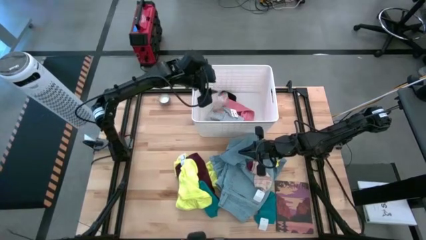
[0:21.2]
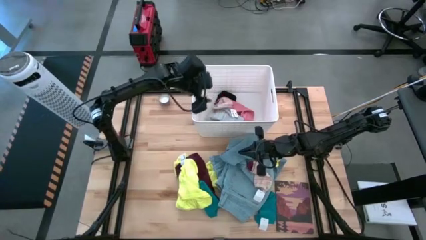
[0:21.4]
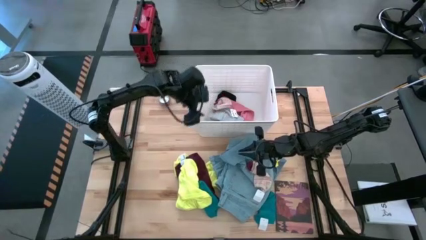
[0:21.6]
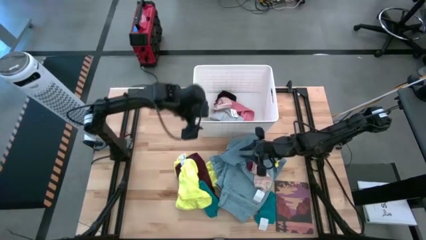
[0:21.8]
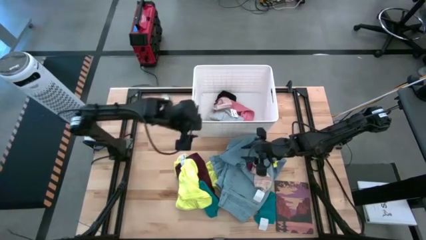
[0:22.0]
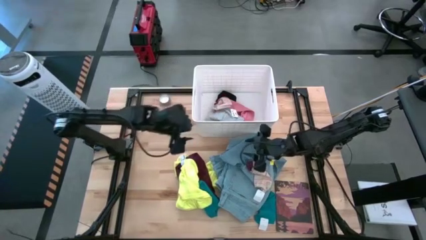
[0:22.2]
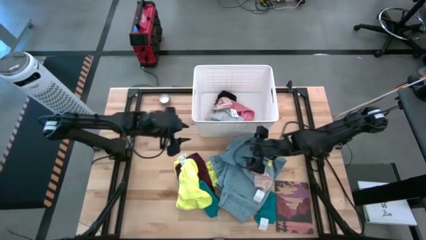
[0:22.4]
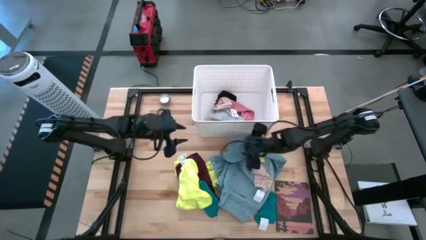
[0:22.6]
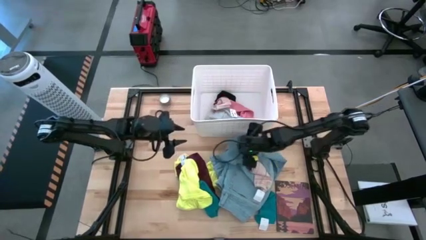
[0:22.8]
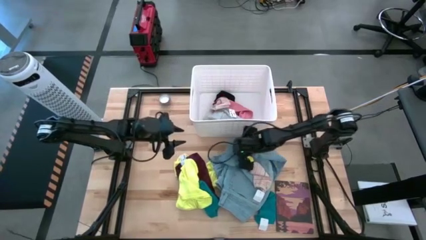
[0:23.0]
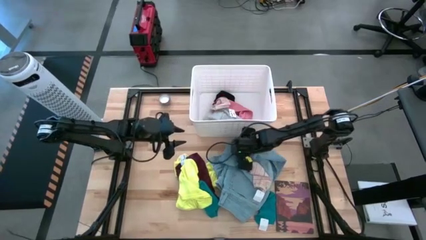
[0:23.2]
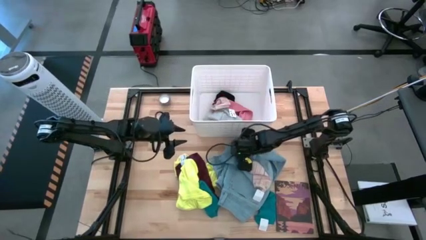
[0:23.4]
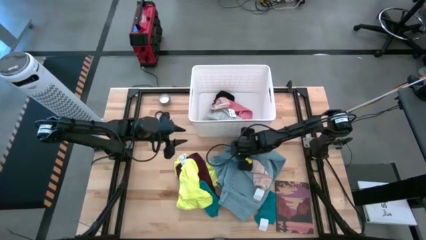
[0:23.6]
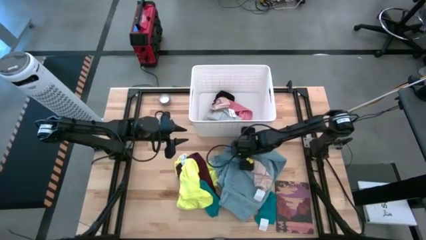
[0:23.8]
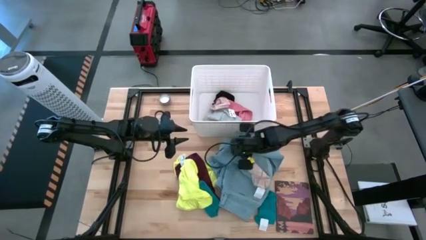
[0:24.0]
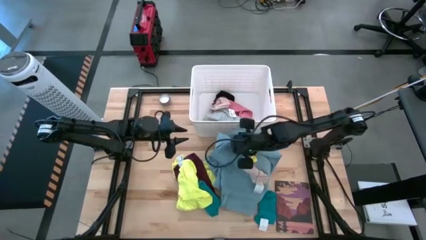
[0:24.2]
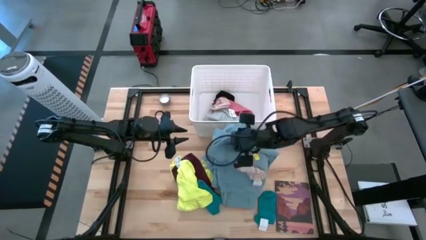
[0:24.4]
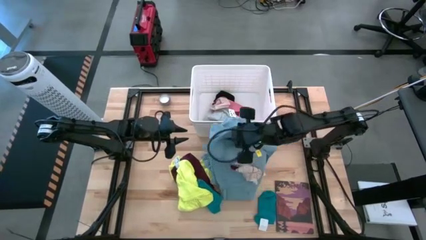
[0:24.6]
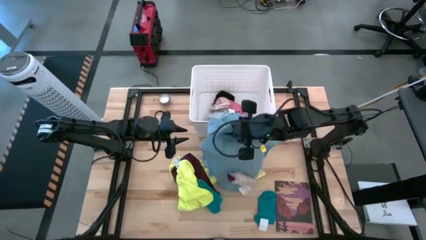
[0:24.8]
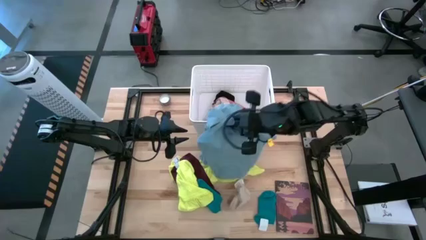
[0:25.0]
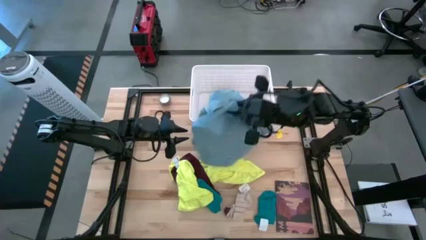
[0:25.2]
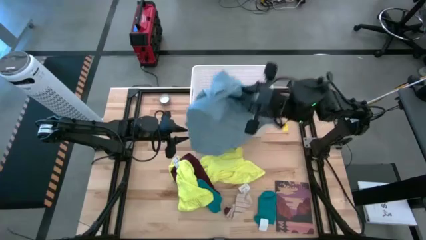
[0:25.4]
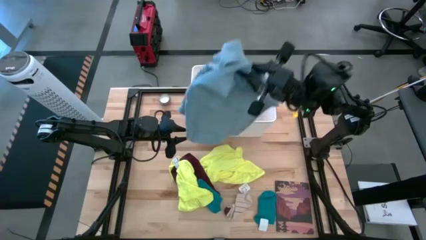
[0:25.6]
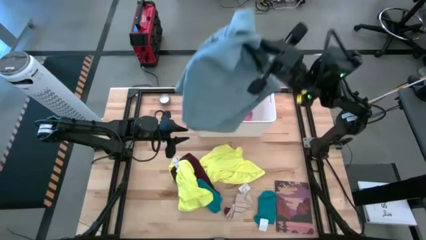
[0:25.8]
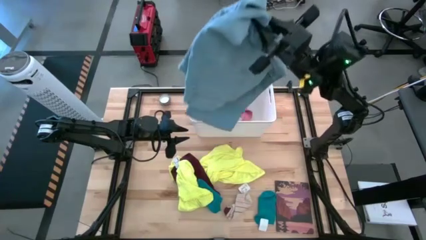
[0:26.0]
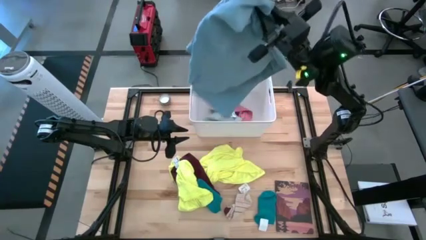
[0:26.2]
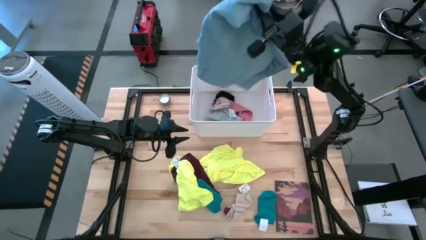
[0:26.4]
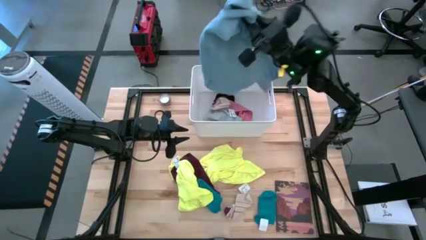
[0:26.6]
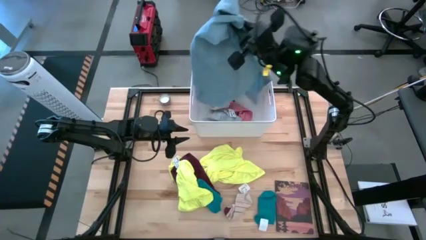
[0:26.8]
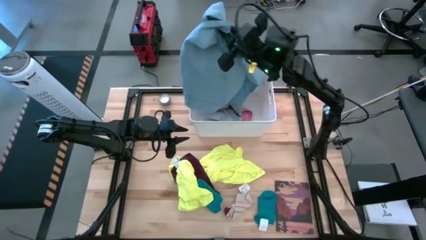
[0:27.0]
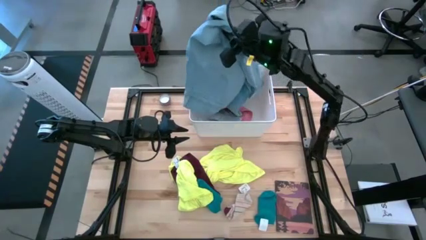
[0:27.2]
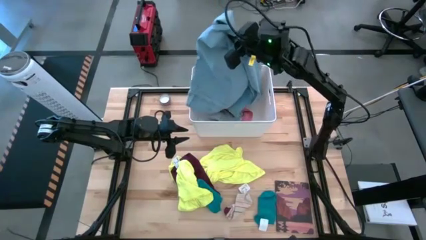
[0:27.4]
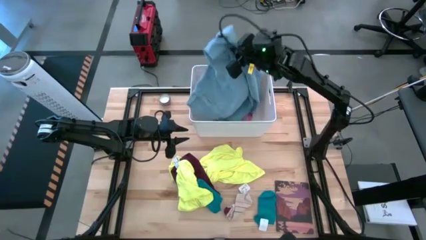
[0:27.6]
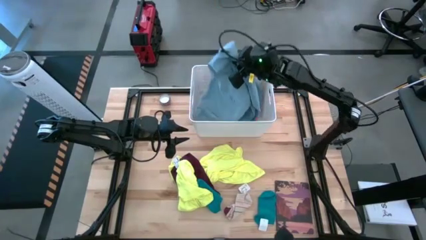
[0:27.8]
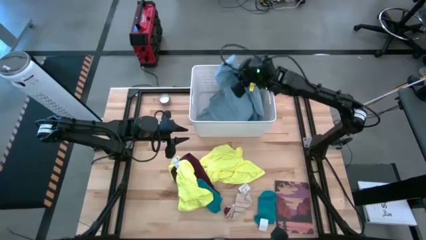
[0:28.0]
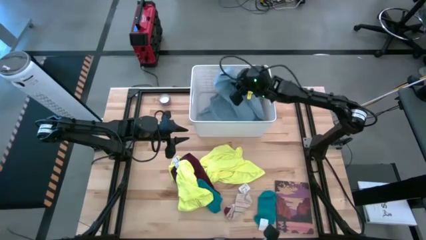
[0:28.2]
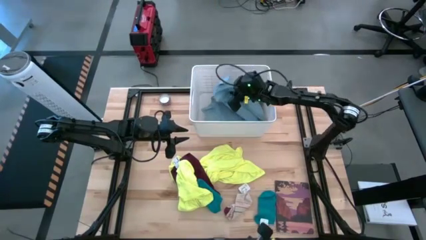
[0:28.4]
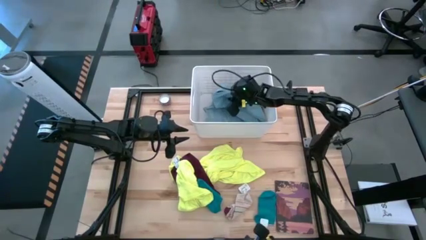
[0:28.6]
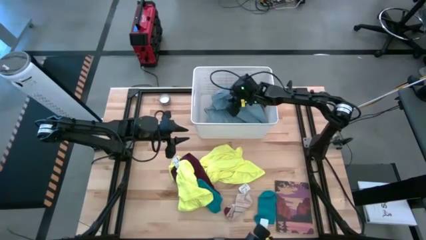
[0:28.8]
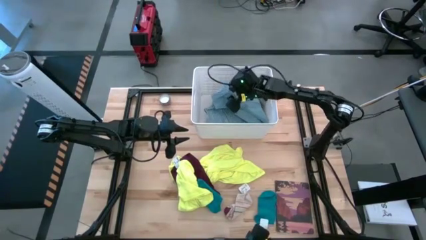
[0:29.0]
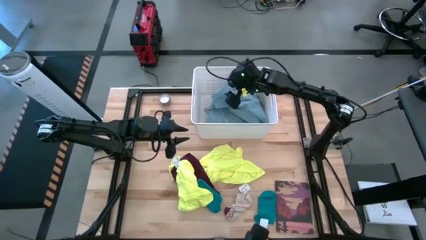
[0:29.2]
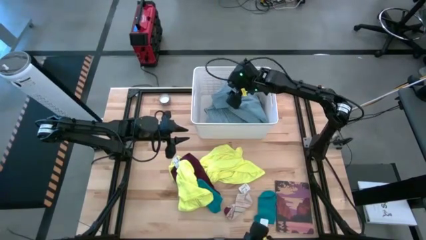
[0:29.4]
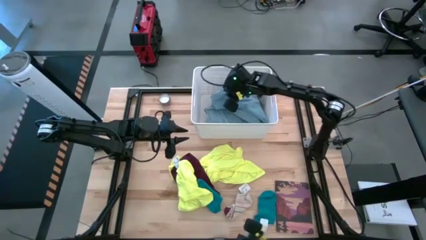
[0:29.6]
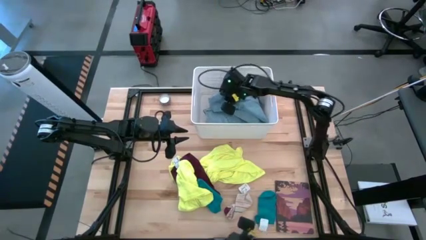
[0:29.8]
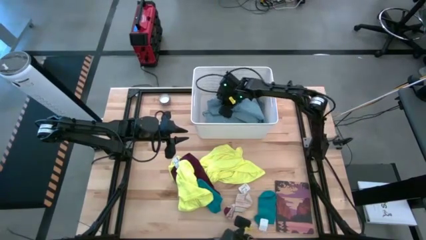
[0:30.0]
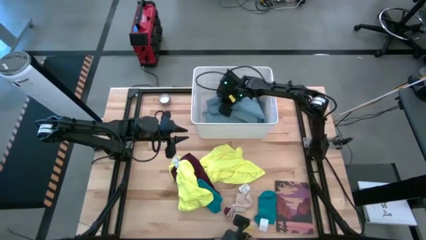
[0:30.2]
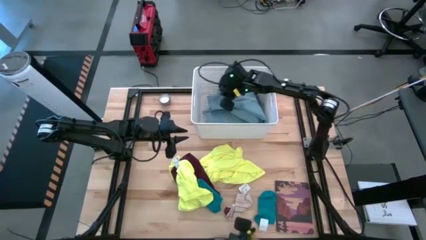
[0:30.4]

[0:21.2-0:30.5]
Task: Sort clothes
Put the blue pants into the white bin

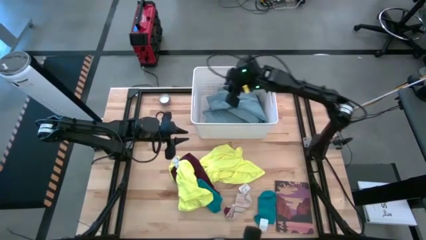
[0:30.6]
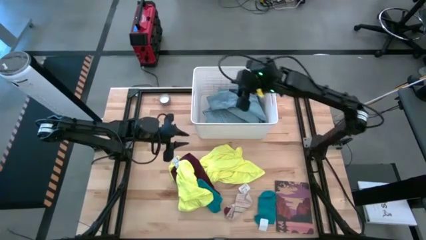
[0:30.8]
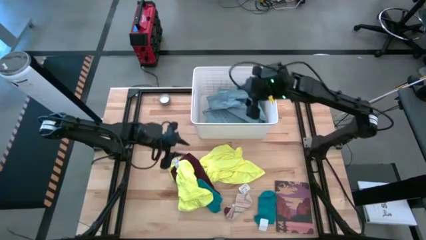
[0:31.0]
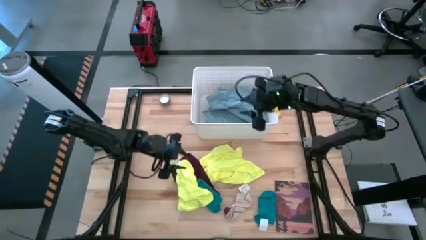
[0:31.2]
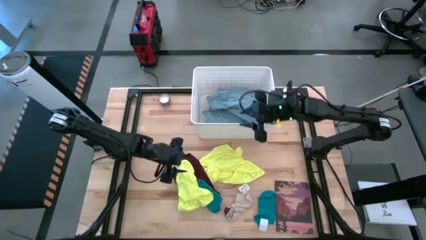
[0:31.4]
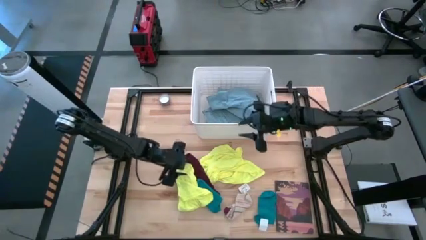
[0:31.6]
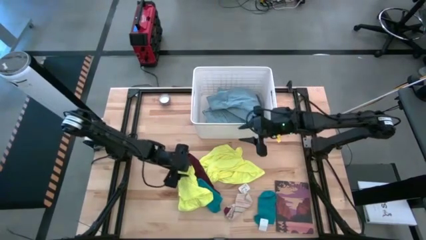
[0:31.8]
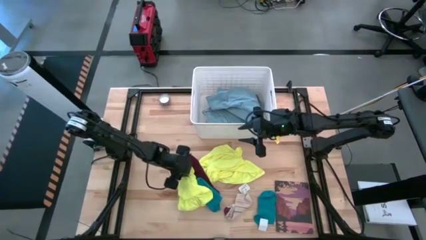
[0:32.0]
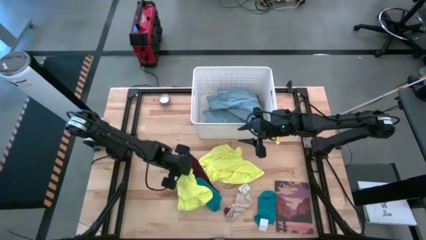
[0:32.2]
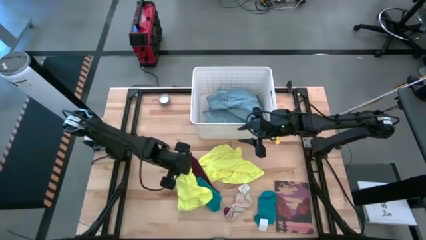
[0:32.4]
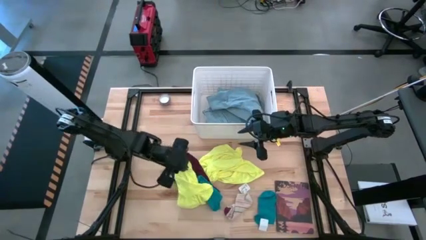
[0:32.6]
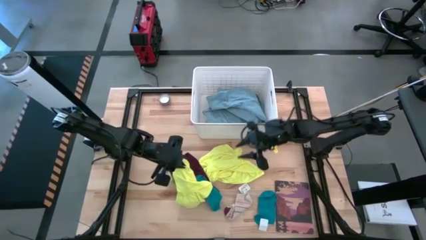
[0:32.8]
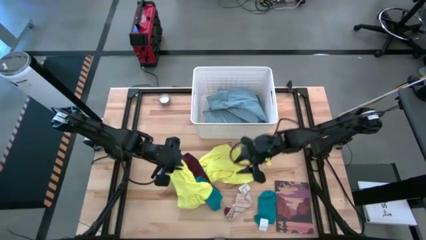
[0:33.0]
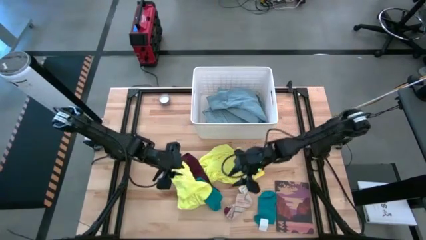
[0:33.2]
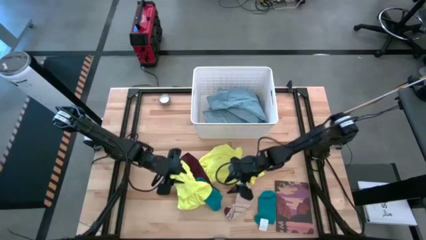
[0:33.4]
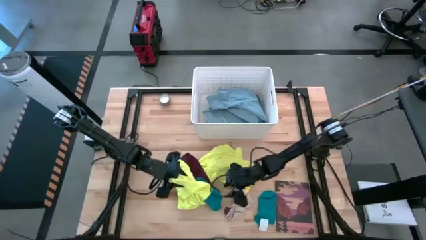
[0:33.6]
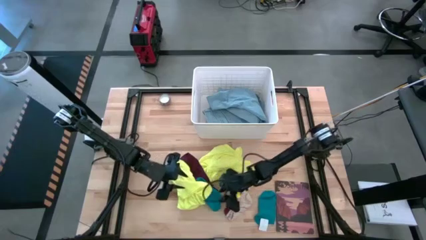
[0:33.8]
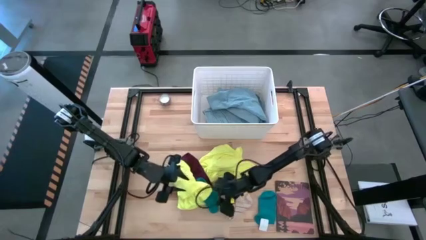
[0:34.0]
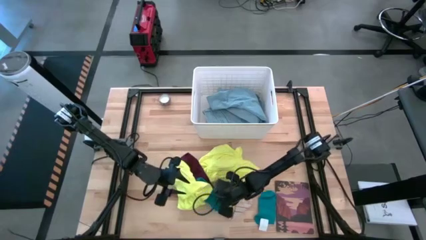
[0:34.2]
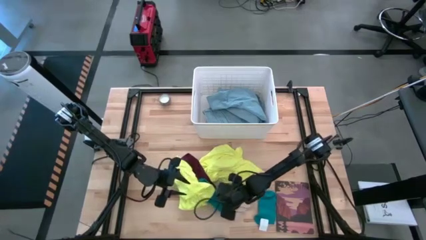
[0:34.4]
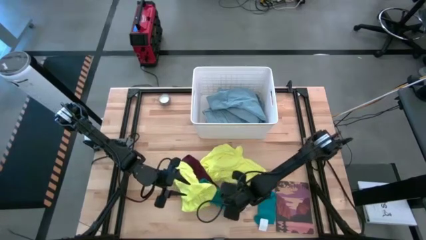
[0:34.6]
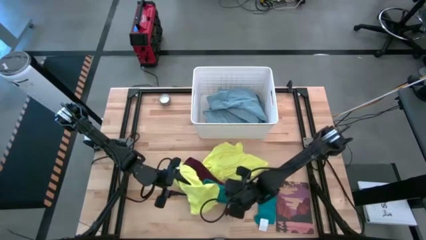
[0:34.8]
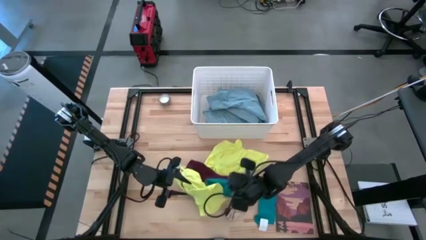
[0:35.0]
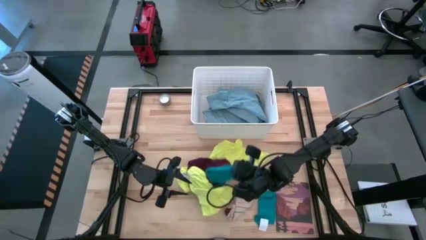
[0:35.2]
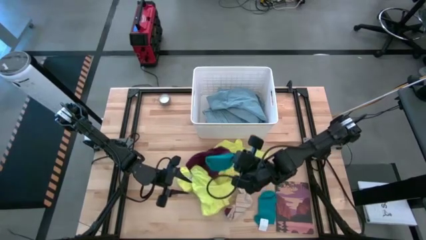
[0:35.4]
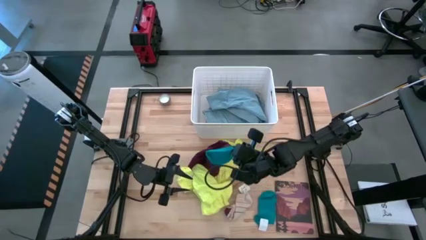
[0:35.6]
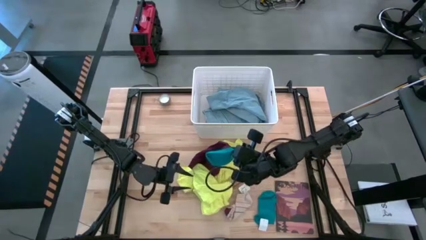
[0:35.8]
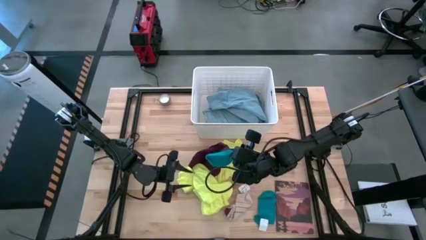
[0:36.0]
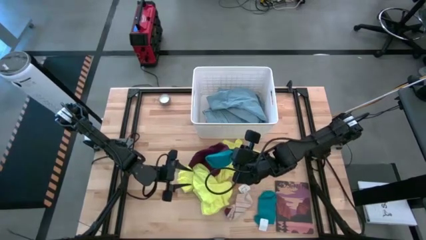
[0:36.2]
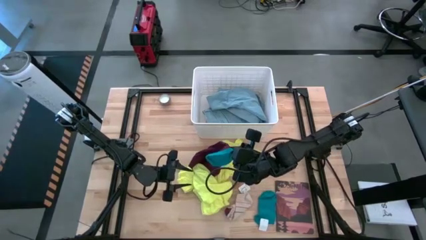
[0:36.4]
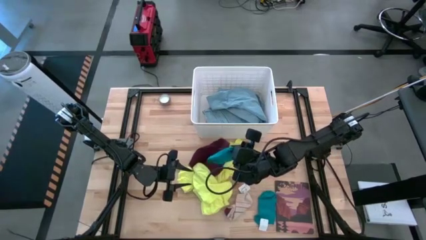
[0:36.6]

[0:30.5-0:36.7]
Put the left blue sock into the white bin

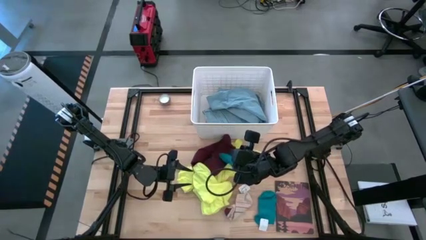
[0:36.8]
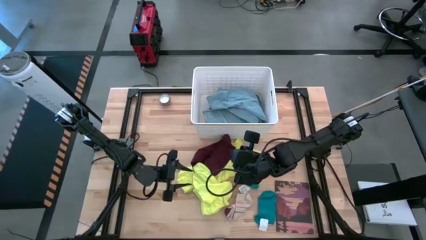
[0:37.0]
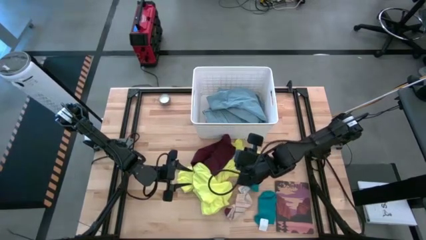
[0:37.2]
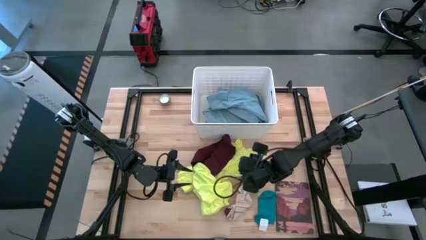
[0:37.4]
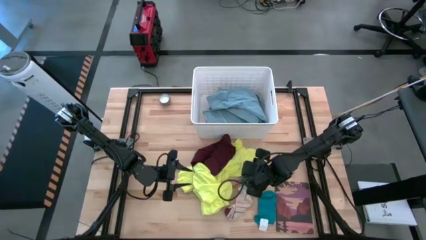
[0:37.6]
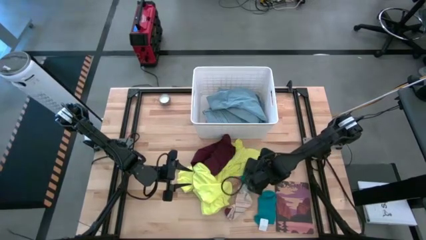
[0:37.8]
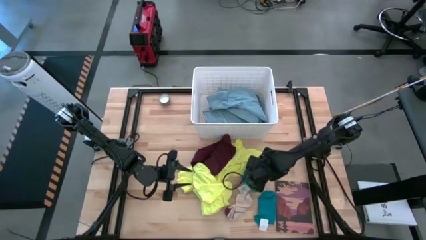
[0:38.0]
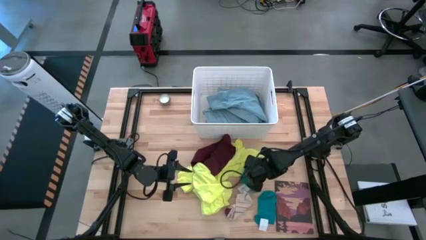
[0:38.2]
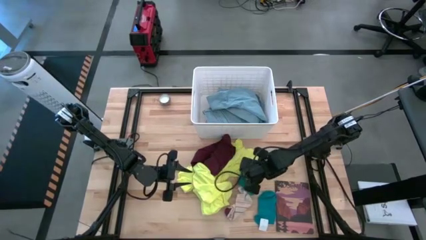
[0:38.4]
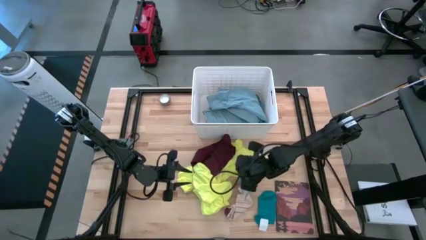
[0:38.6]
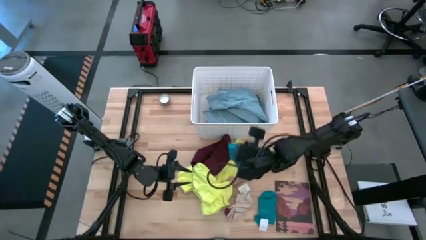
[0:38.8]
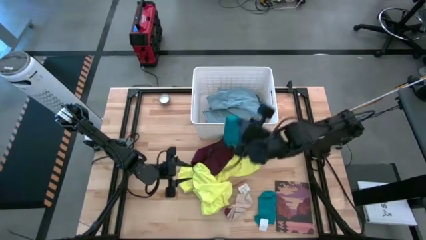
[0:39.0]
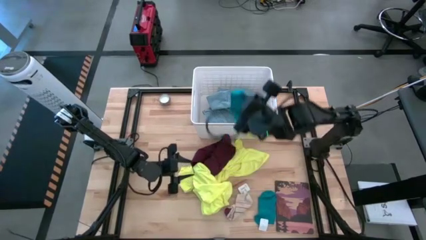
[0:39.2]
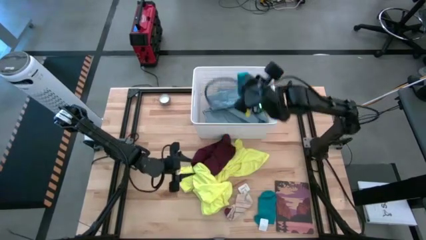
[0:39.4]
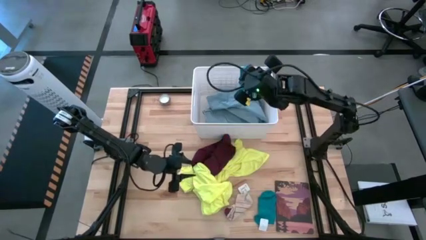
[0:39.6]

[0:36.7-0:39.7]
Put the left blue sock into the white bin
